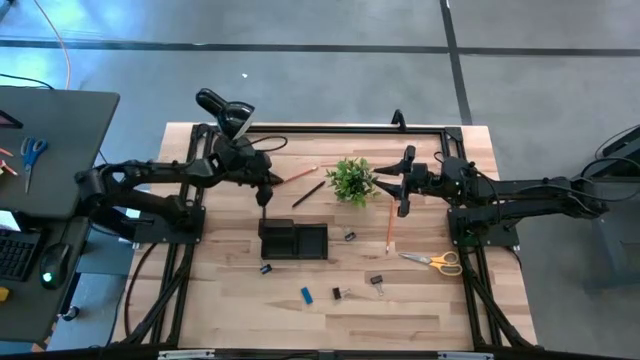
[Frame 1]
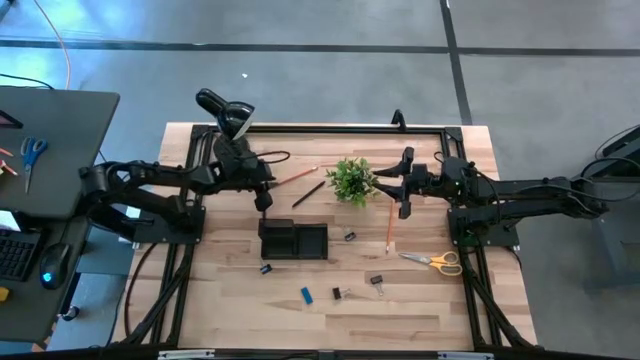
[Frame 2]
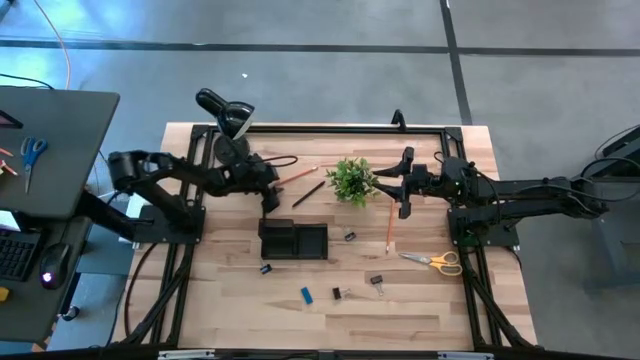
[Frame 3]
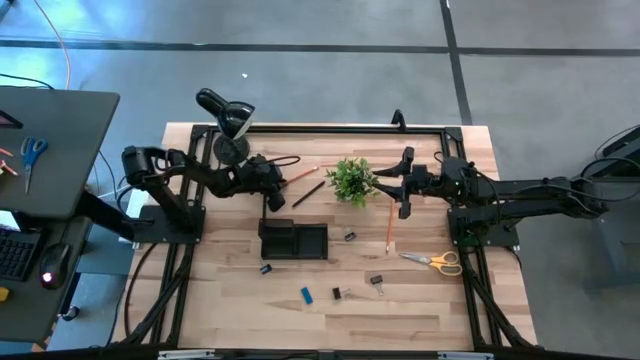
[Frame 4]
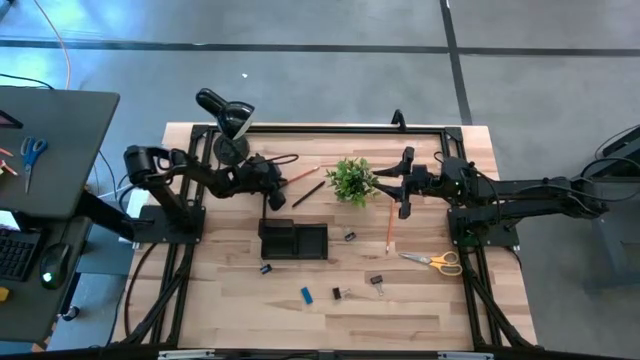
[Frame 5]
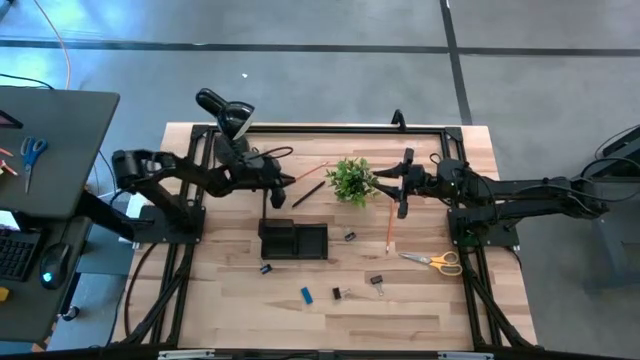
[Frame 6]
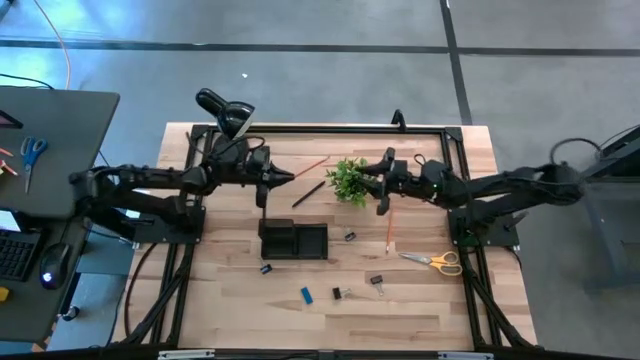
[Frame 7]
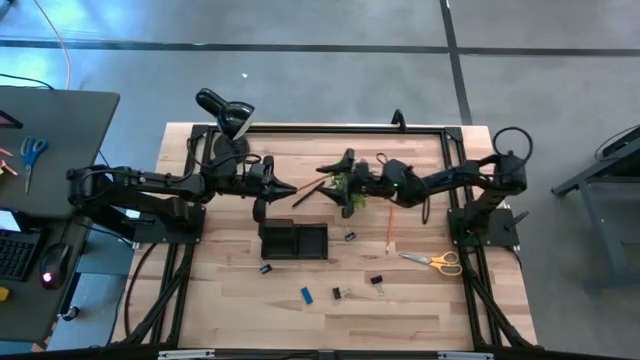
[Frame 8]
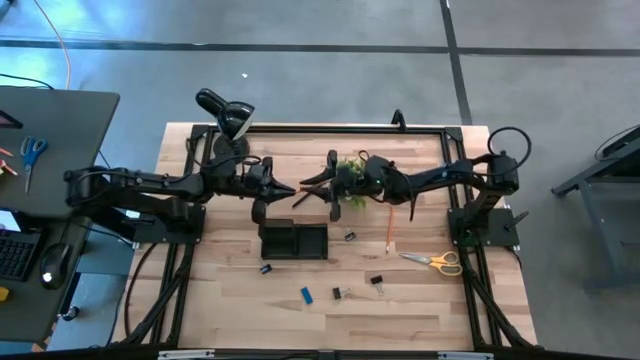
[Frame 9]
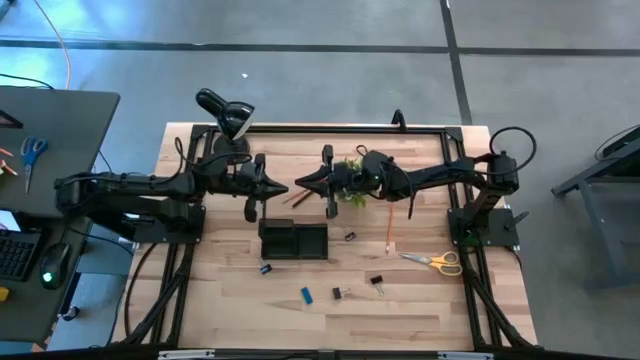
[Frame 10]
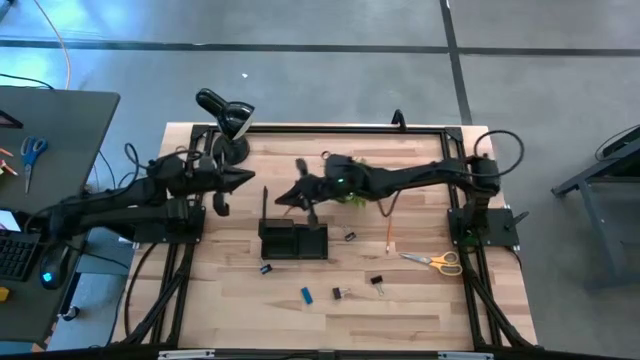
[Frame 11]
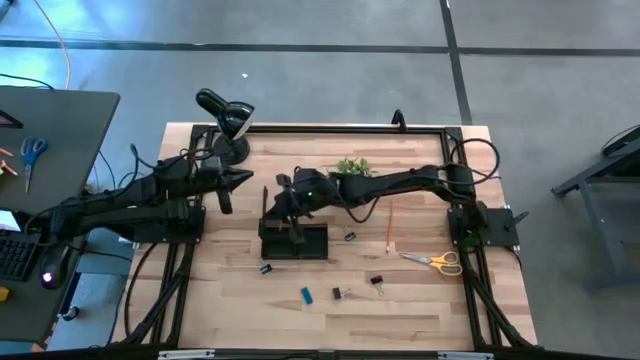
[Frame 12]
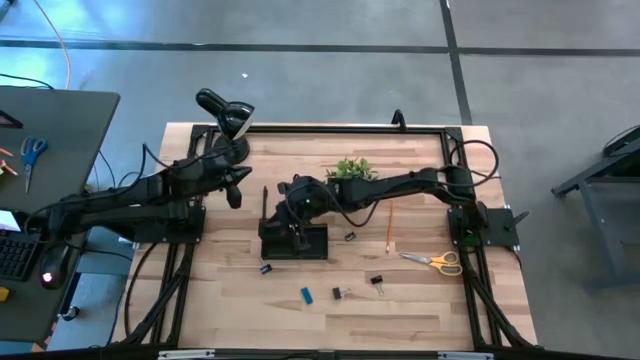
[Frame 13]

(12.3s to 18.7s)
Task: Pick and place office supplies into organizer
Put the orange pencil into the black desk organizer

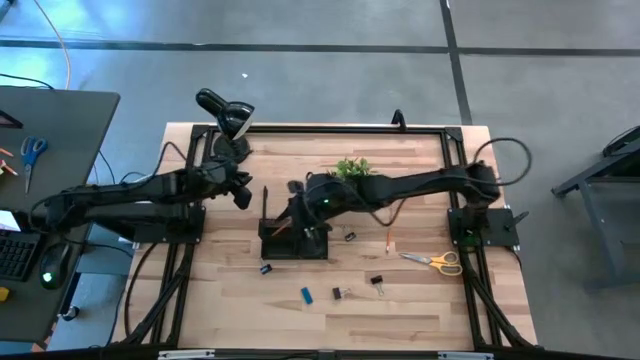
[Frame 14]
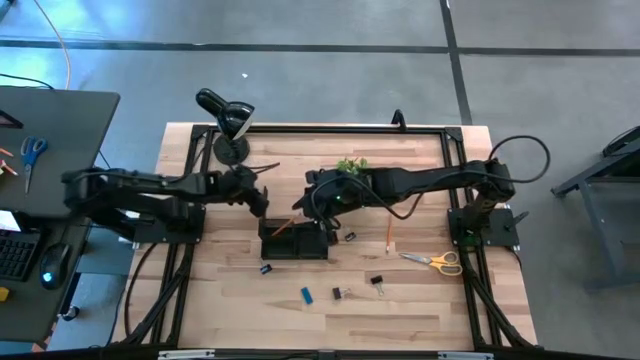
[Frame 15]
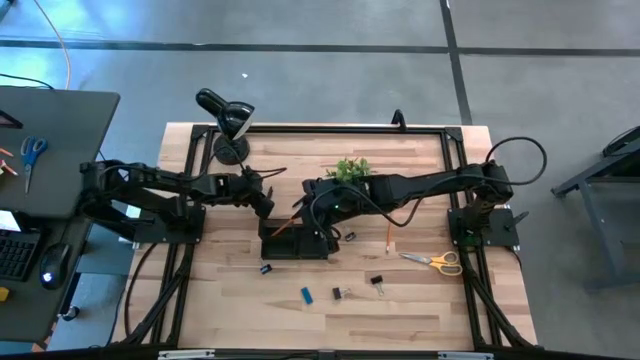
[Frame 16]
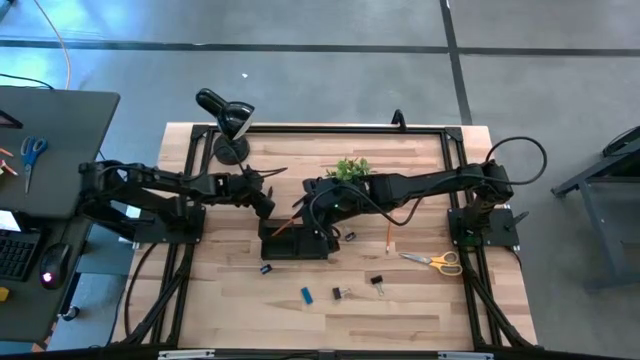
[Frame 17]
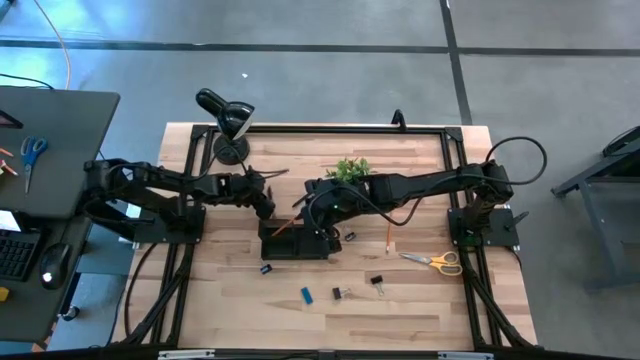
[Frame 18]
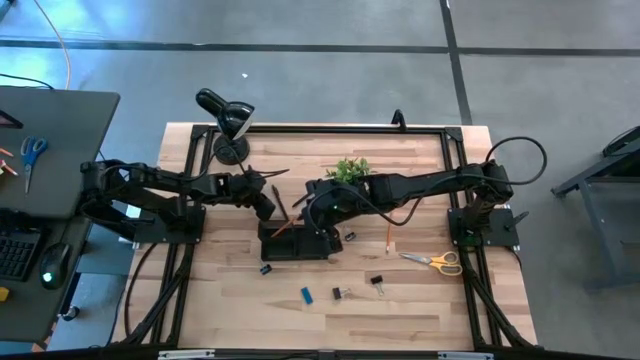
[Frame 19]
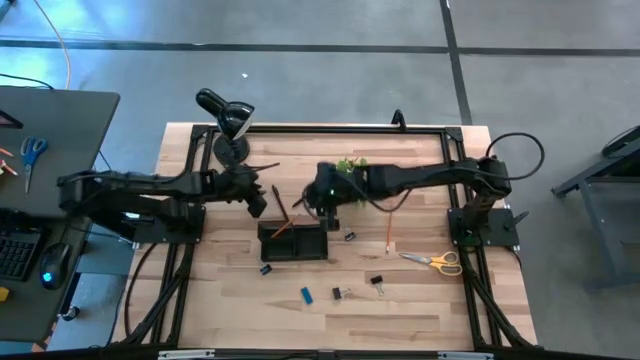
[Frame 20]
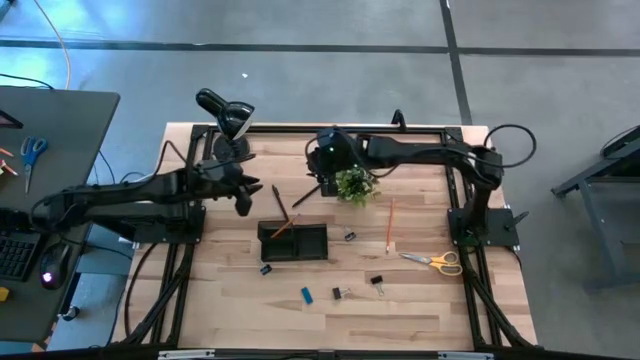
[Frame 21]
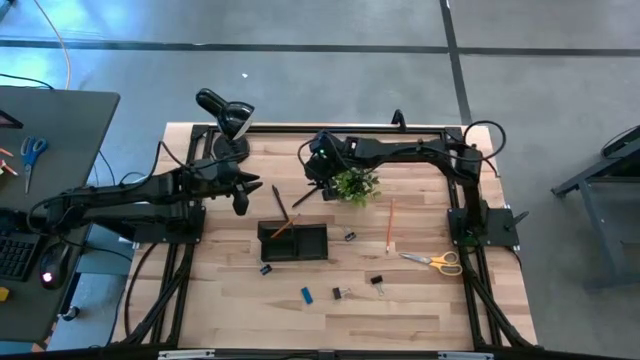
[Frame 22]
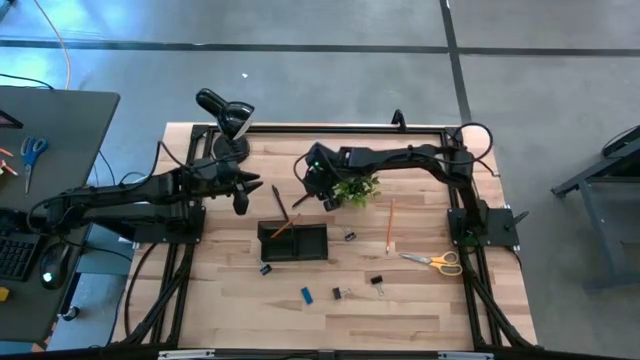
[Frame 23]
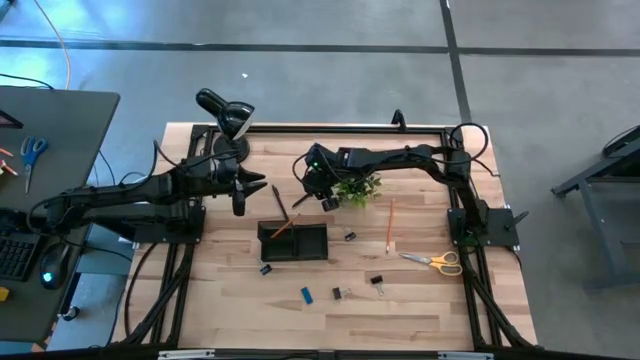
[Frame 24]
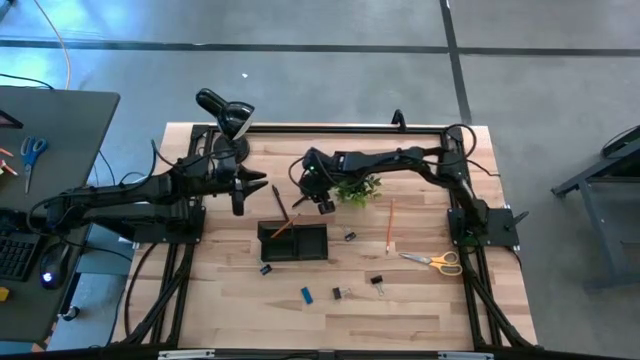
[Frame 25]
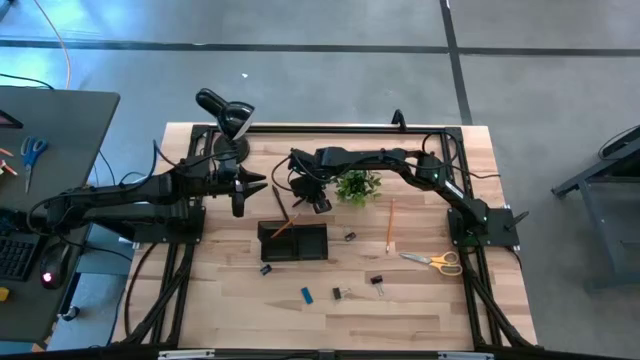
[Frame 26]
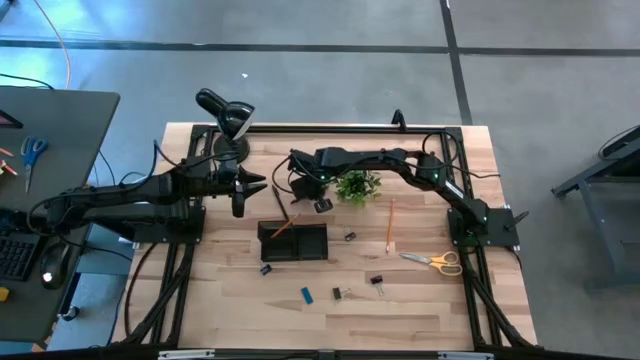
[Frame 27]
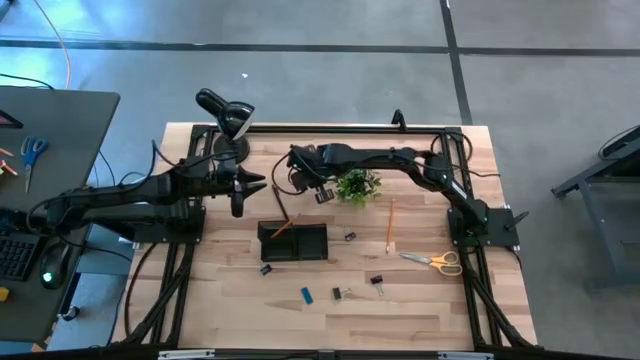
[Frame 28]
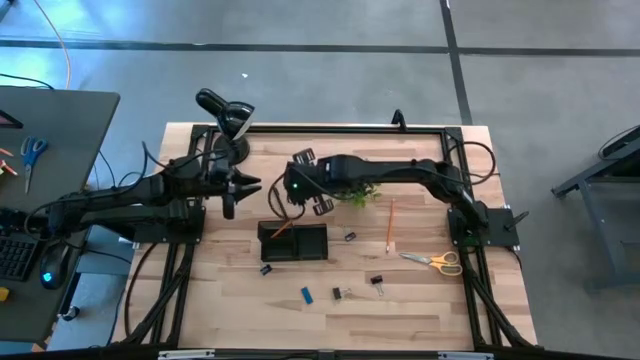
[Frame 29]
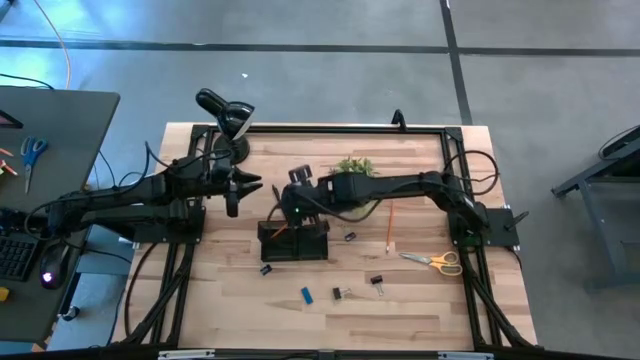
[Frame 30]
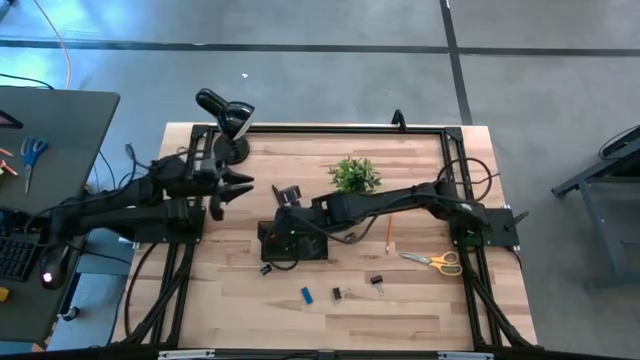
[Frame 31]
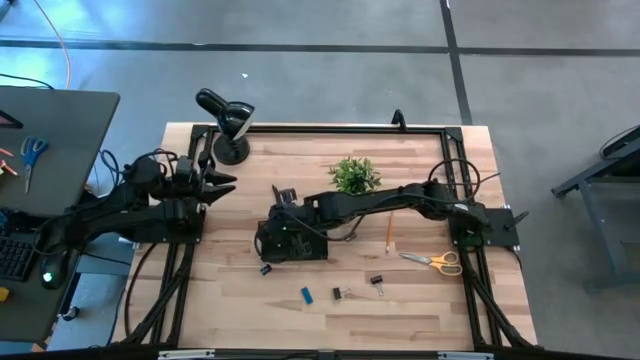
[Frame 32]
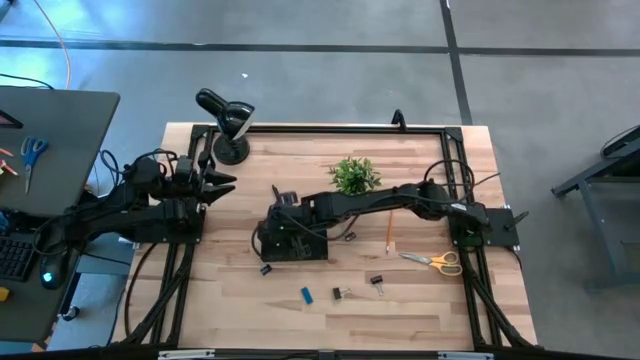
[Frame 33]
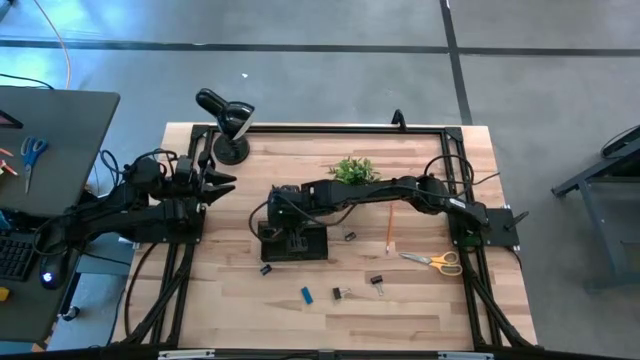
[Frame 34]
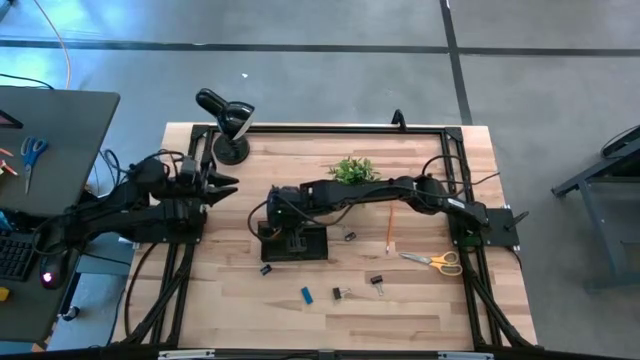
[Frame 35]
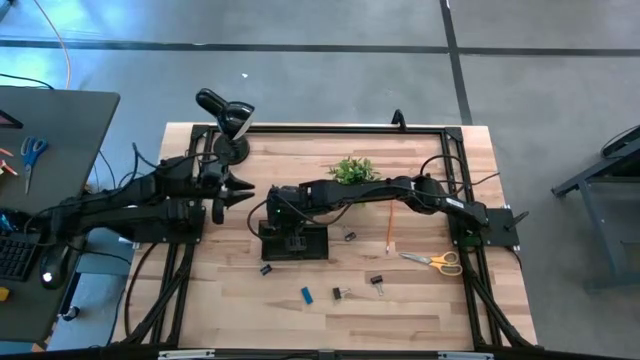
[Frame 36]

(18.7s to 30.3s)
Put the black pen into the black desk organizer

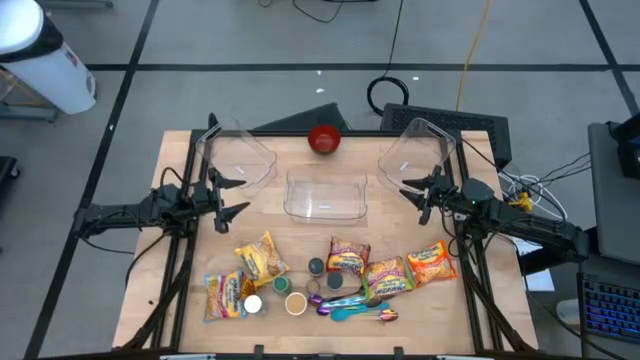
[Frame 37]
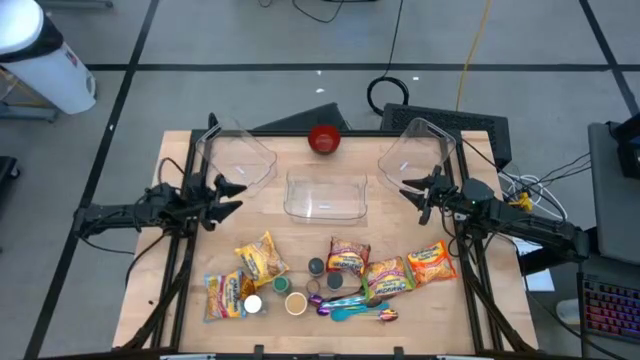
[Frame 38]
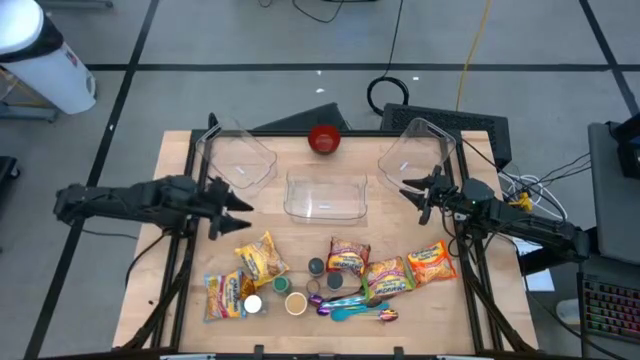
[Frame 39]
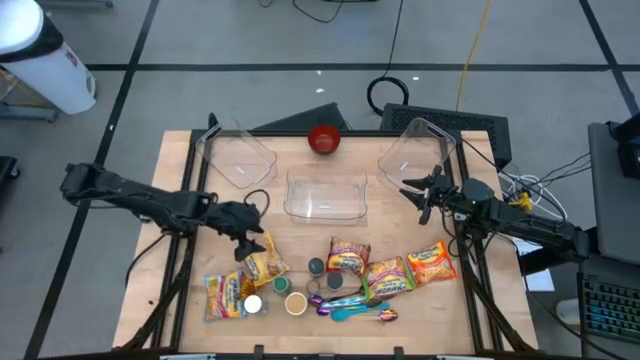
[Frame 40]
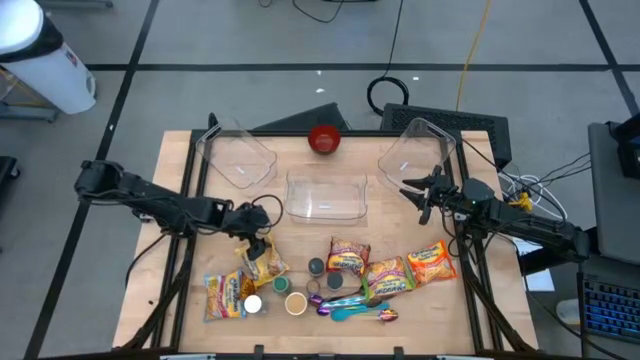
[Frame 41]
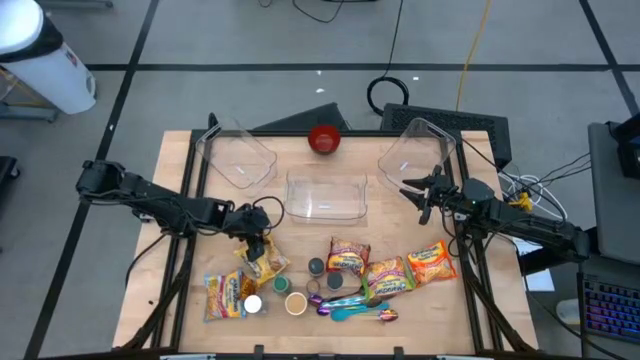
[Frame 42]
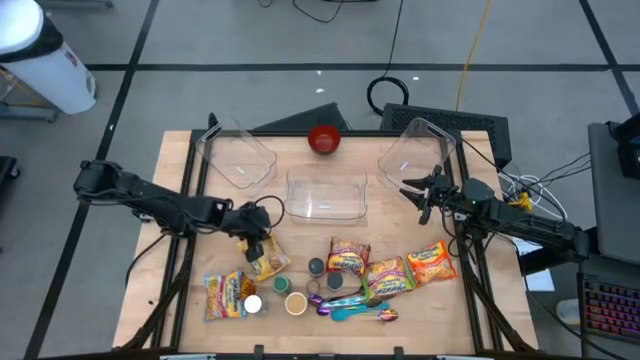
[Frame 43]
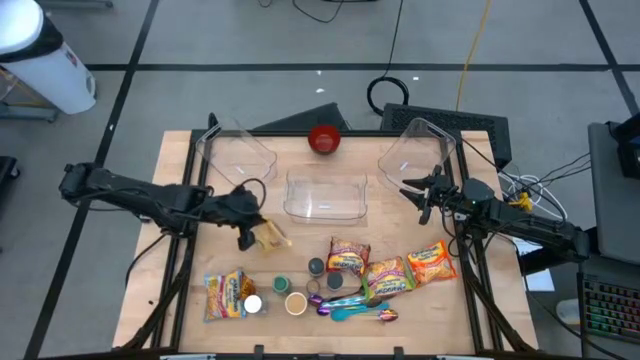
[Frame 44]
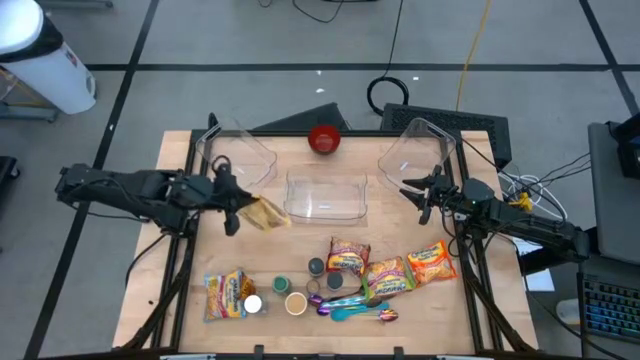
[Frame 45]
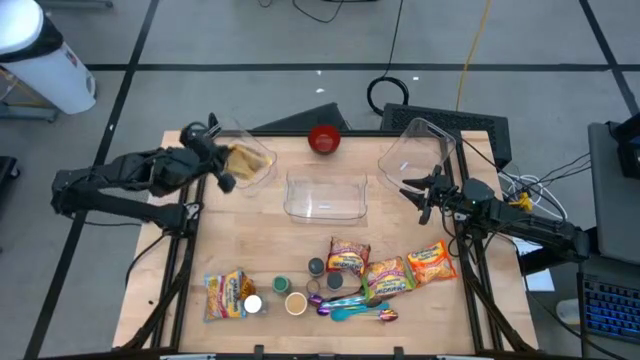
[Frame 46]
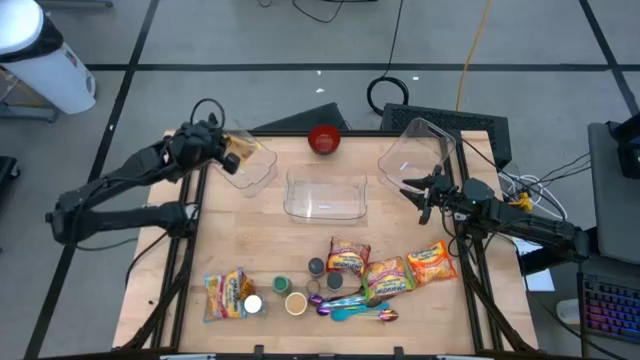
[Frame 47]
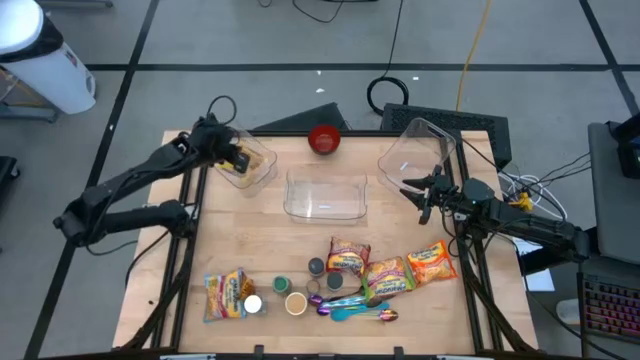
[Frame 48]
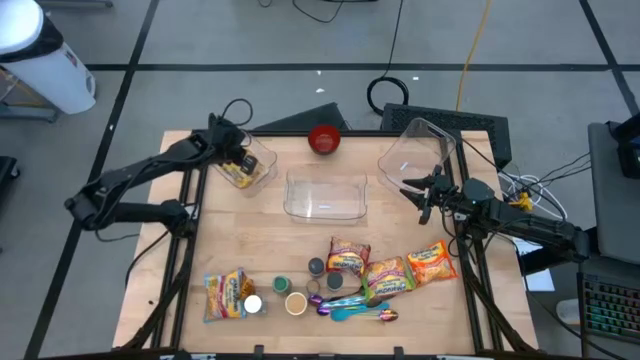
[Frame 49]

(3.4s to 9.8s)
Task: Pick & Place Food Item
Put the yellow noodle pack into the left transparent bin
